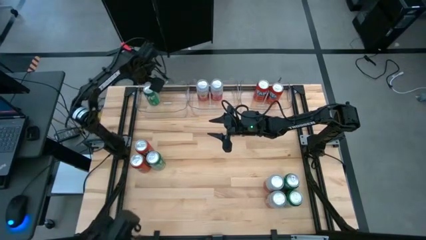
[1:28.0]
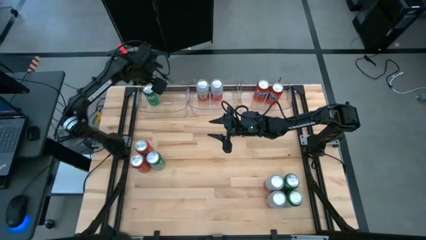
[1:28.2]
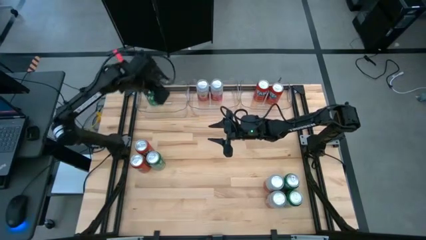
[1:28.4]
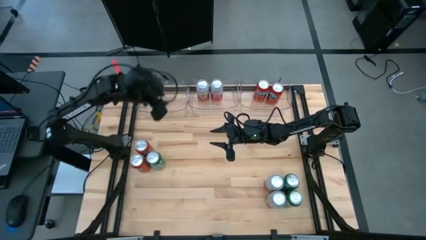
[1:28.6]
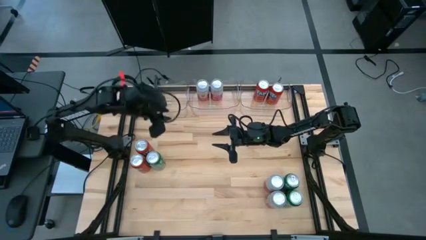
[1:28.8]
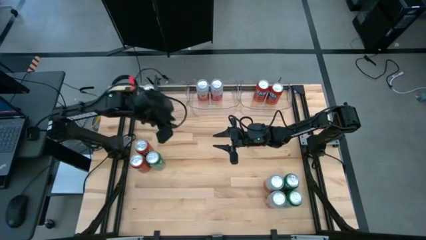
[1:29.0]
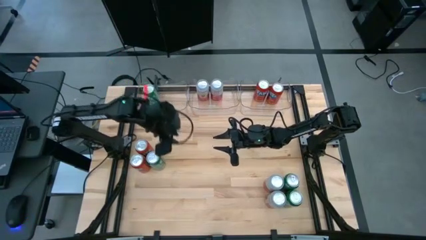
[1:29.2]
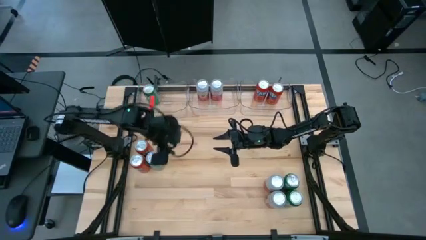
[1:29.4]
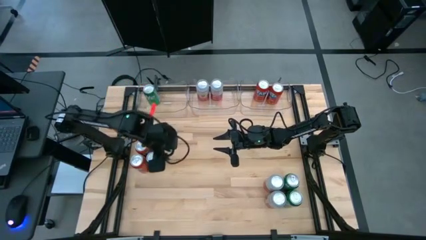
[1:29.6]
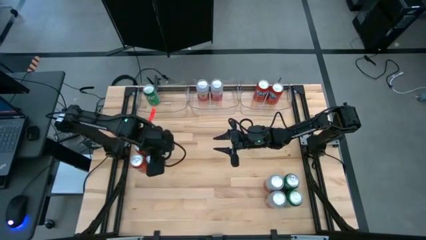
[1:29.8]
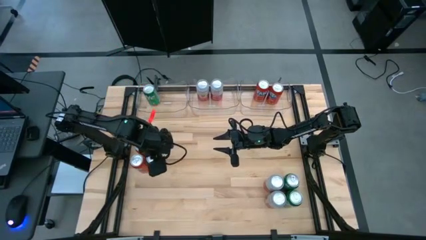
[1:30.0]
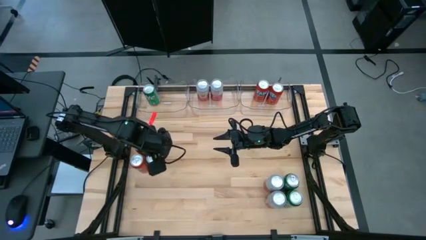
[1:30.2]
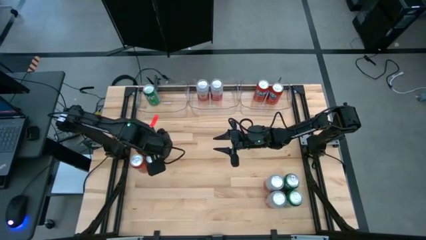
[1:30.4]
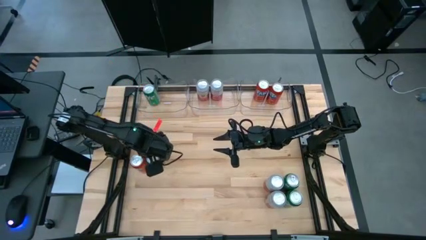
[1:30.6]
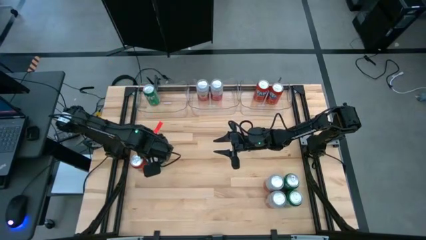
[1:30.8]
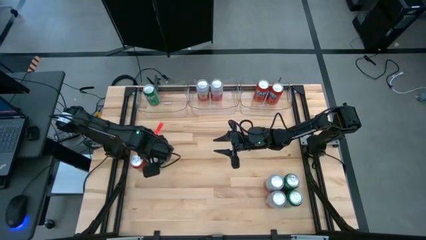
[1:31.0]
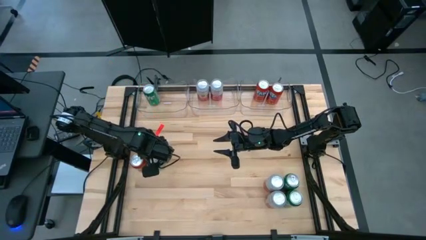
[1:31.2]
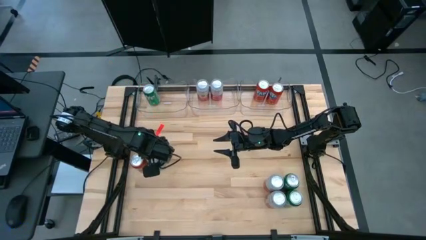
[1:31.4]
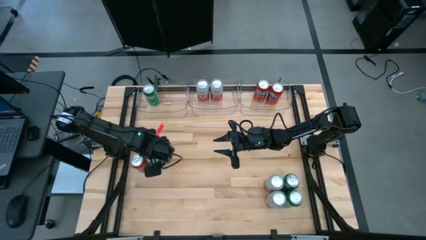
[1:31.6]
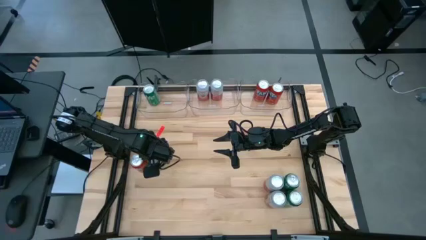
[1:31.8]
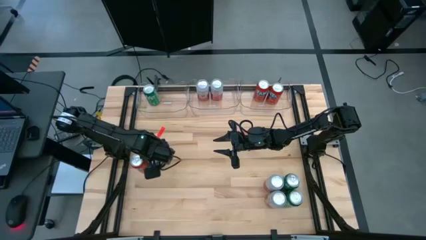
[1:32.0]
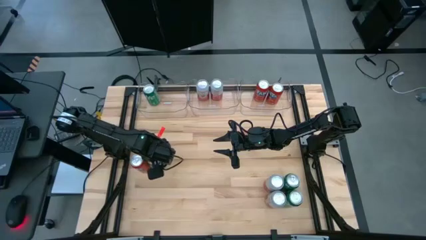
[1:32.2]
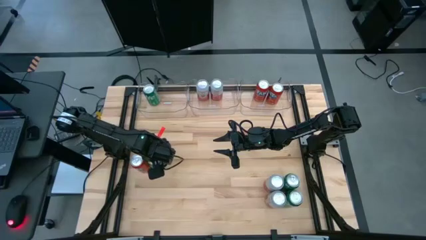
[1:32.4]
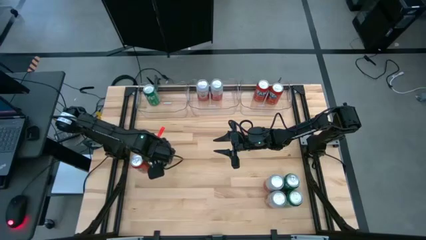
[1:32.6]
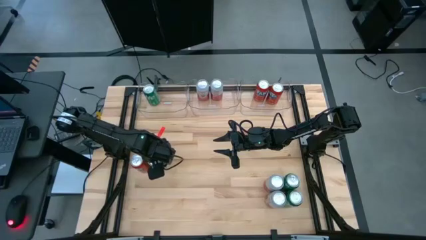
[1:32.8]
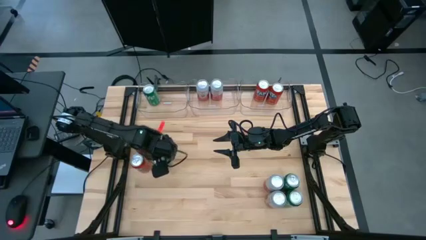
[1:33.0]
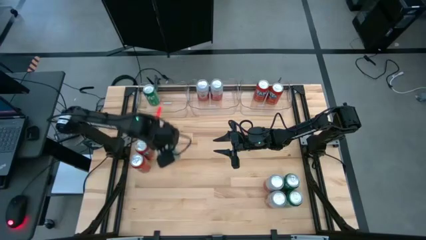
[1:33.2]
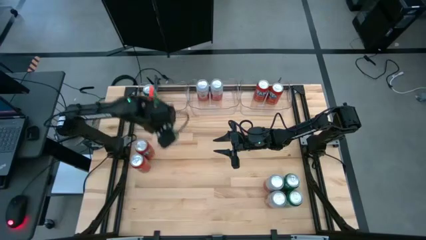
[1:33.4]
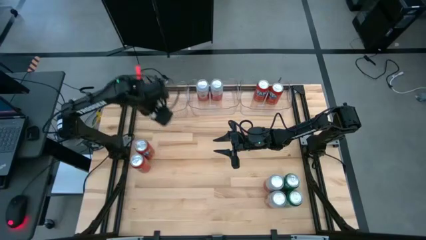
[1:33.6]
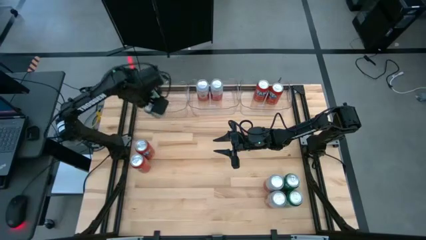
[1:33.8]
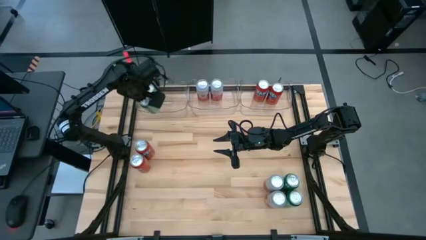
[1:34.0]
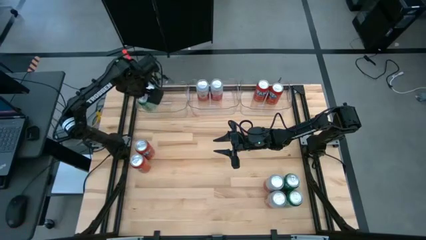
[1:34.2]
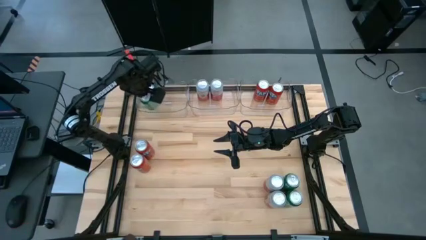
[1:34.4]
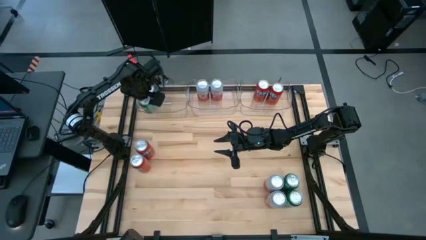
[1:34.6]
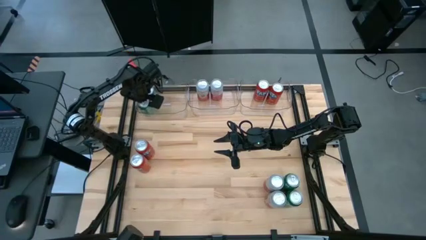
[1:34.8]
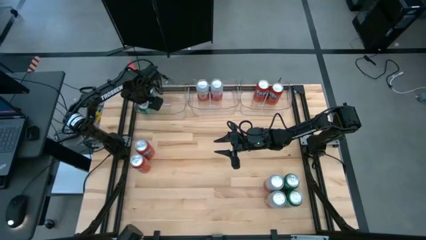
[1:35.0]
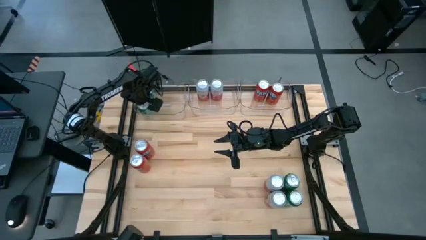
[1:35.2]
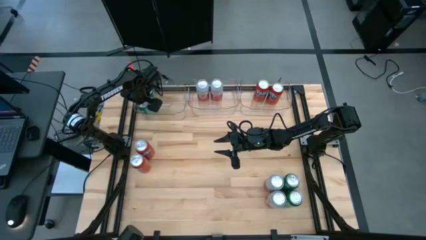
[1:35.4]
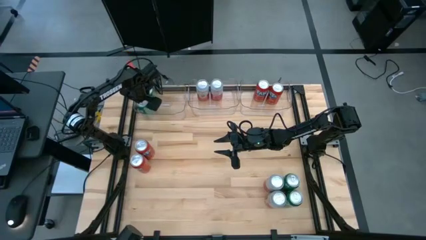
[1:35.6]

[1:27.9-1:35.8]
Task: Sort soda cans
Put the green soda can in the top left transparent bin

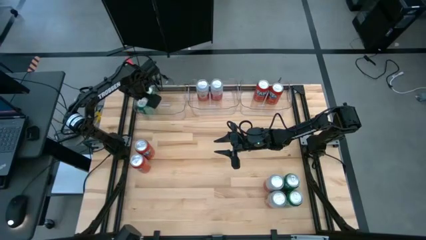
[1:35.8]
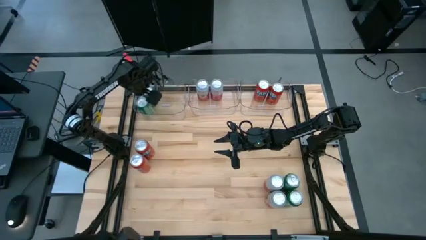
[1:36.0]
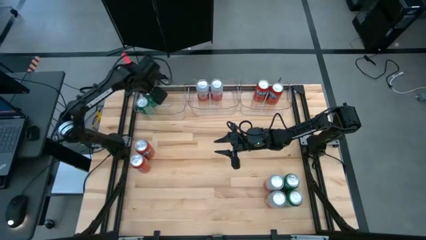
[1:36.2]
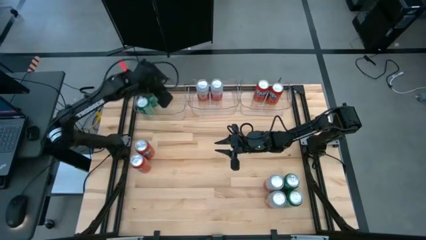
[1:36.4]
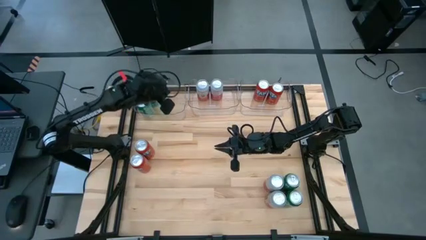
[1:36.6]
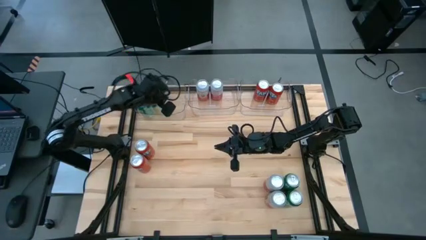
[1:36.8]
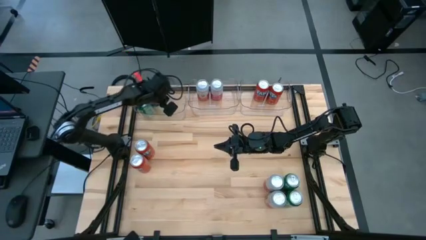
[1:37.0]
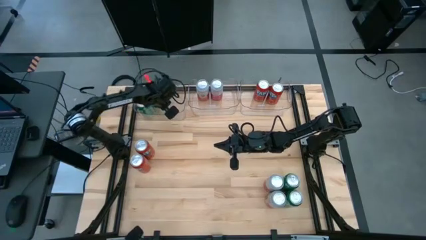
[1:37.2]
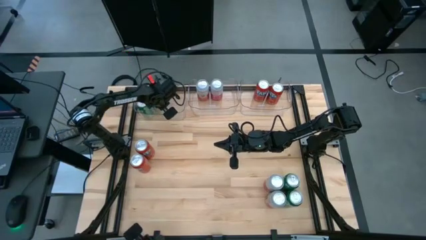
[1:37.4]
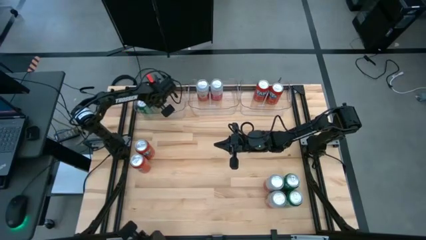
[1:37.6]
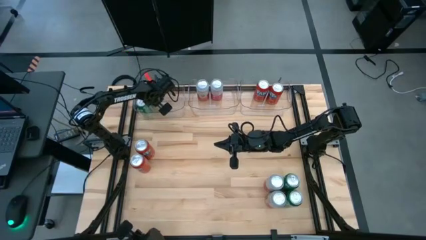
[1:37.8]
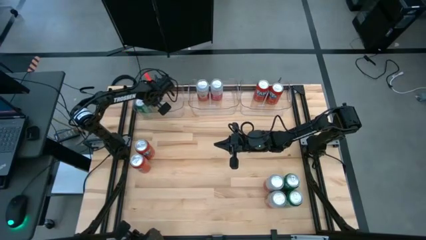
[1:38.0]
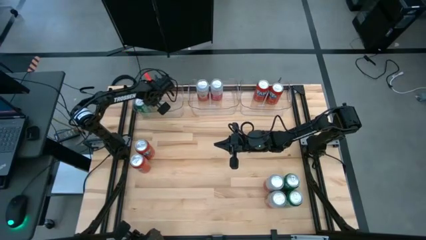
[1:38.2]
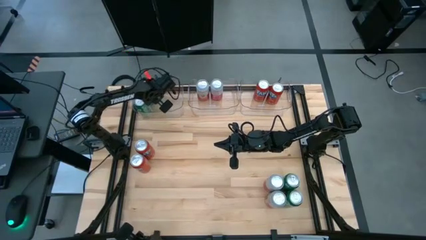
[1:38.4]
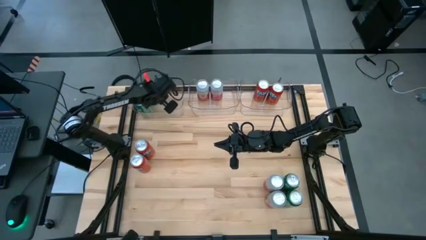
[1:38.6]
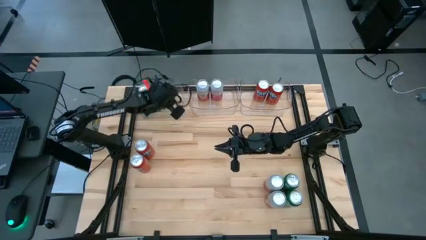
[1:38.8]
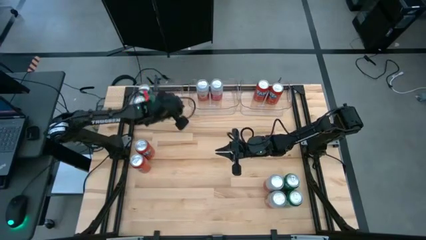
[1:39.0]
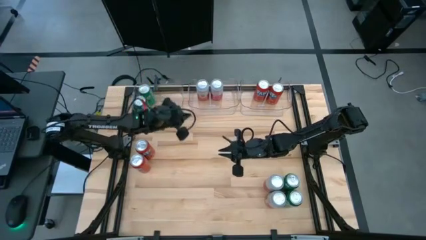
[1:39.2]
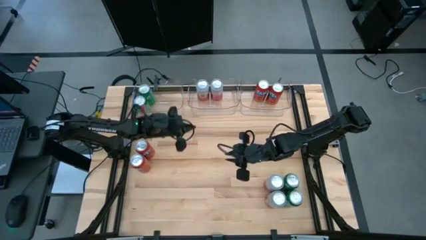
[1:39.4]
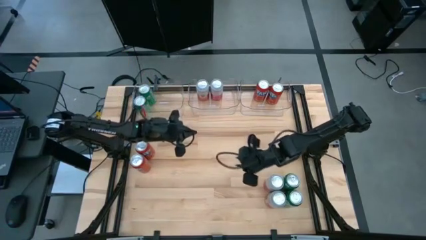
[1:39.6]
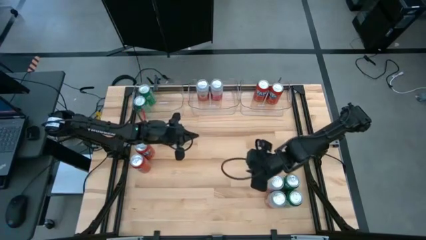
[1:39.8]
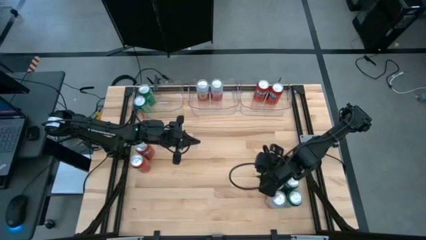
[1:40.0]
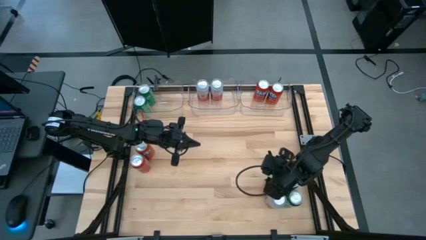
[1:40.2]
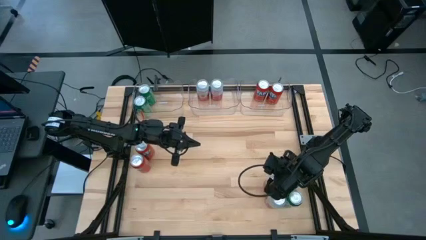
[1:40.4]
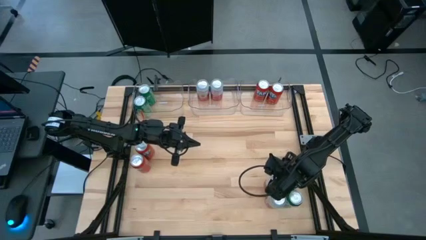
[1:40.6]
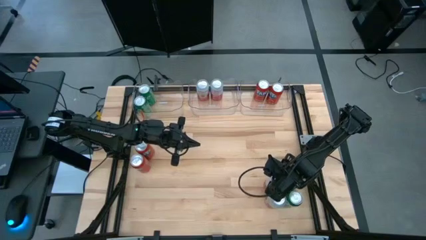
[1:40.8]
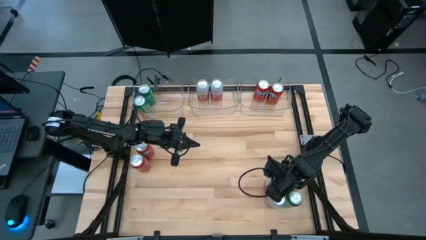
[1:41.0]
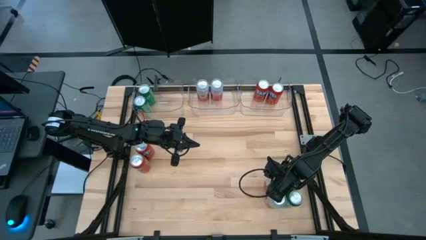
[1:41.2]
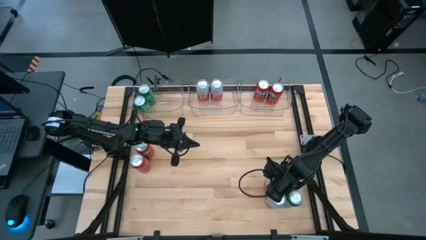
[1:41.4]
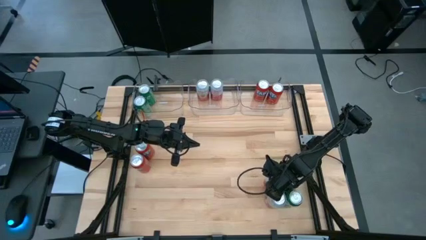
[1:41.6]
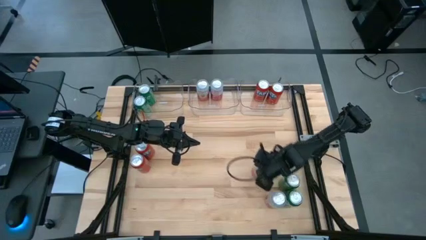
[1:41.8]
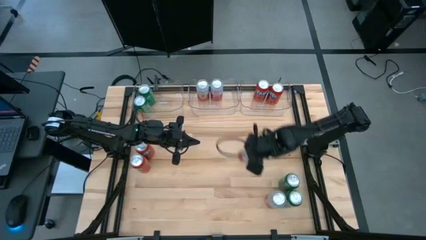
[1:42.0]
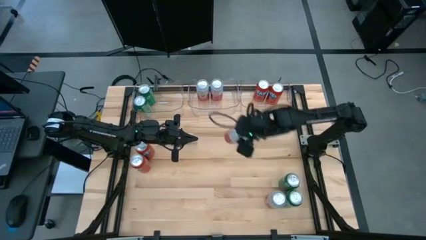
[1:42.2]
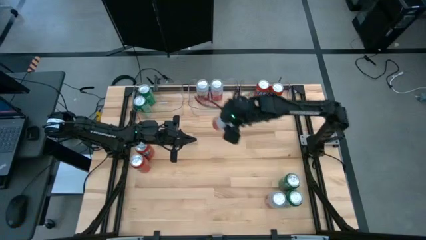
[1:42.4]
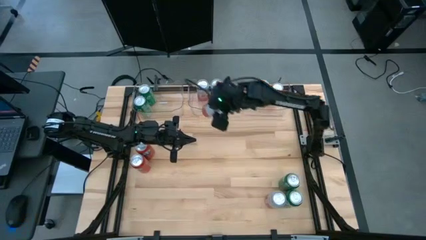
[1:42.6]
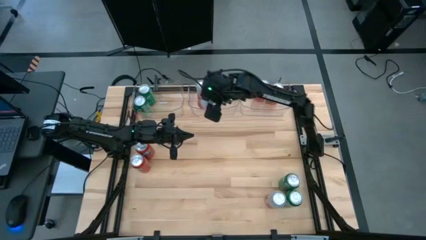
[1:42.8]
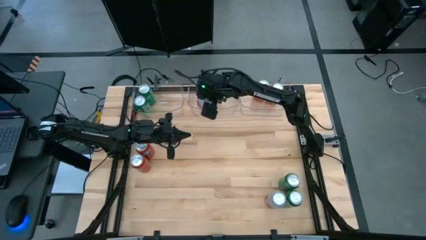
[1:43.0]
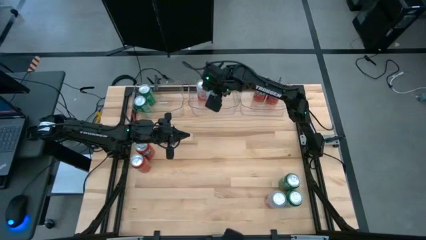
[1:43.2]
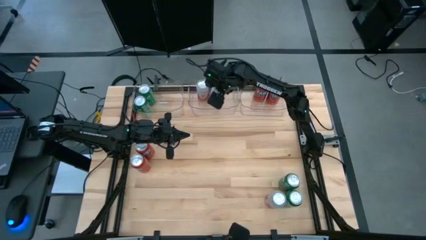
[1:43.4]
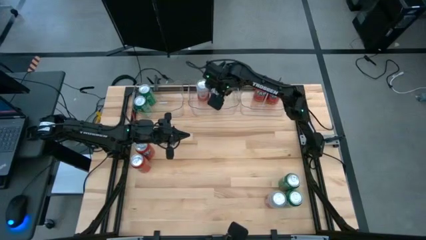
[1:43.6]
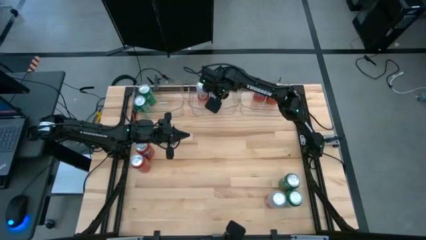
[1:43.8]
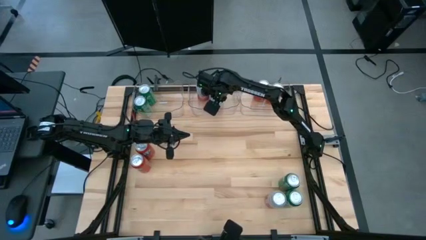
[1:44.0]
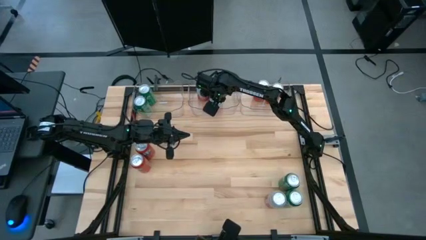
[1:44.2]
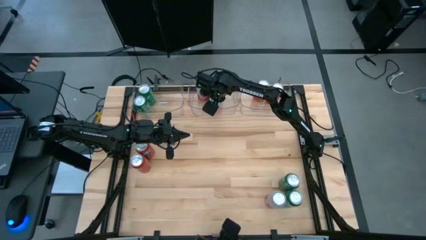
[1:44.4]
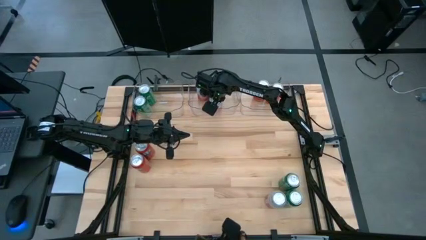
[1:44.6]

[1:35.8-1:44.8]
Put the pink-white soda can into the top center transparent bin
